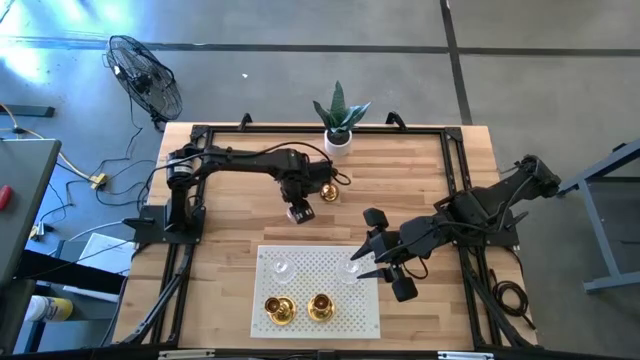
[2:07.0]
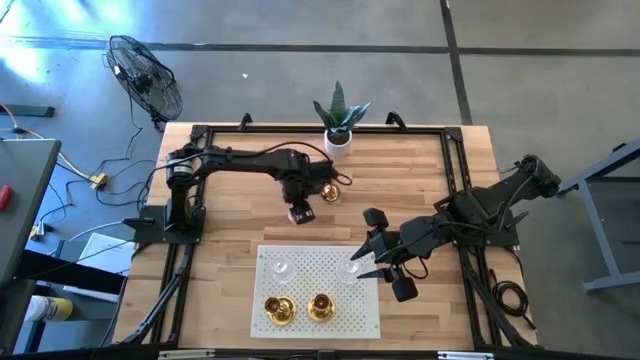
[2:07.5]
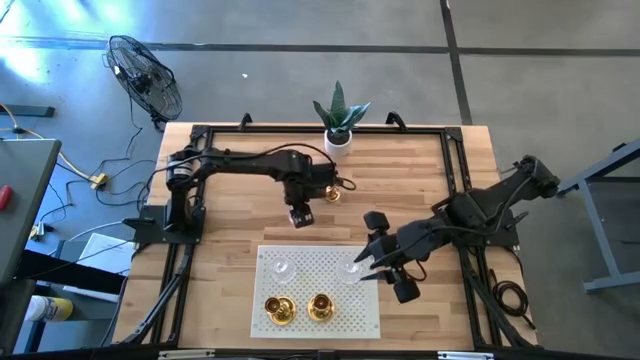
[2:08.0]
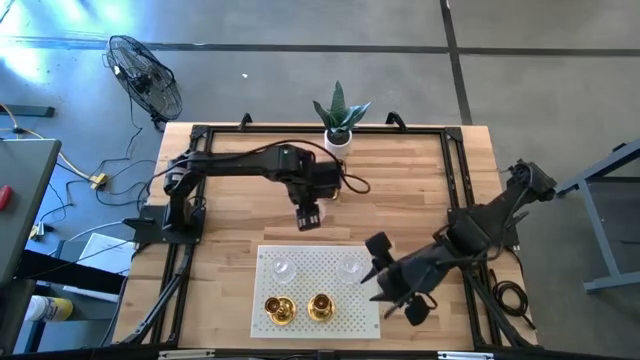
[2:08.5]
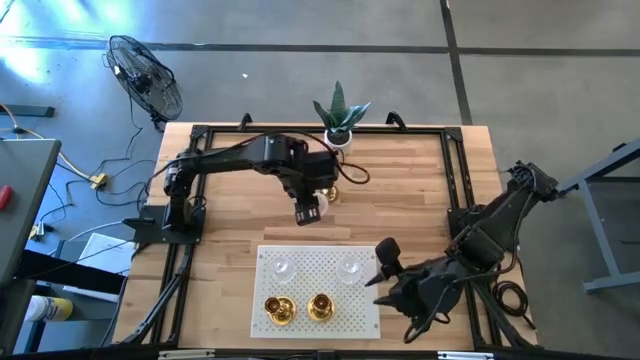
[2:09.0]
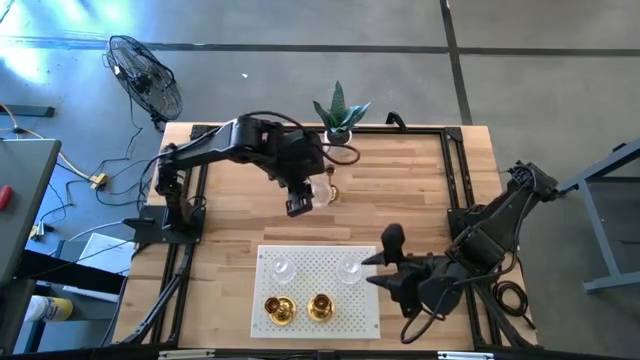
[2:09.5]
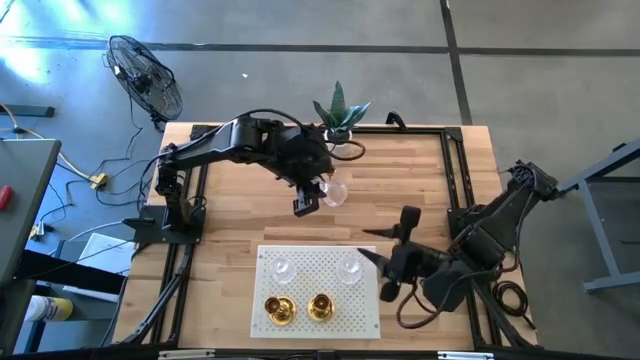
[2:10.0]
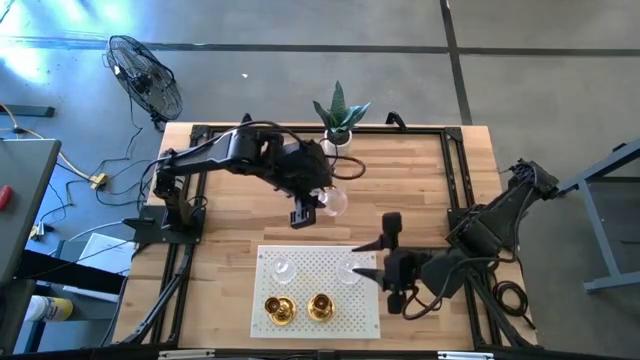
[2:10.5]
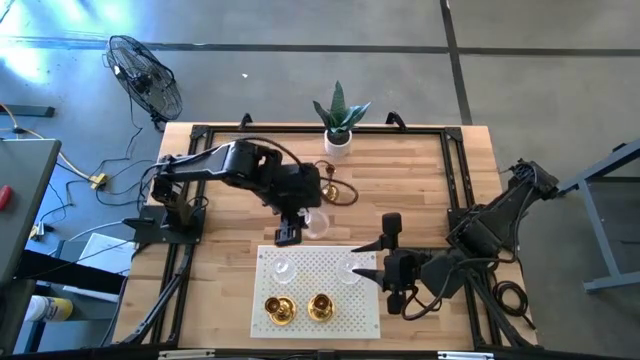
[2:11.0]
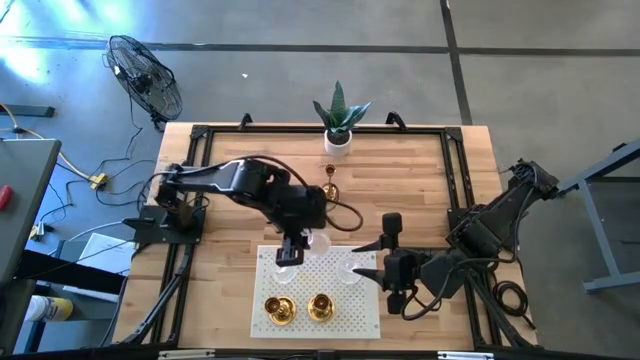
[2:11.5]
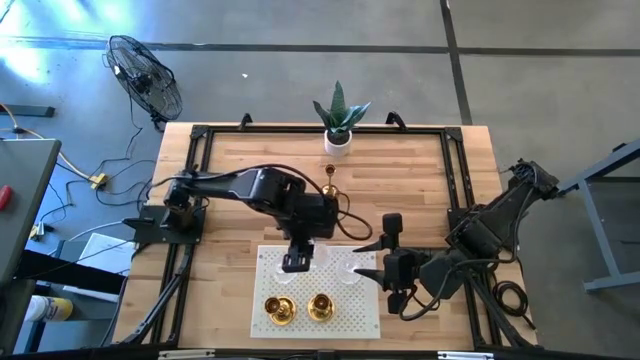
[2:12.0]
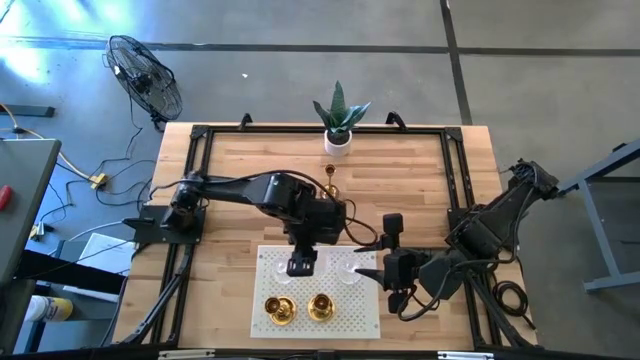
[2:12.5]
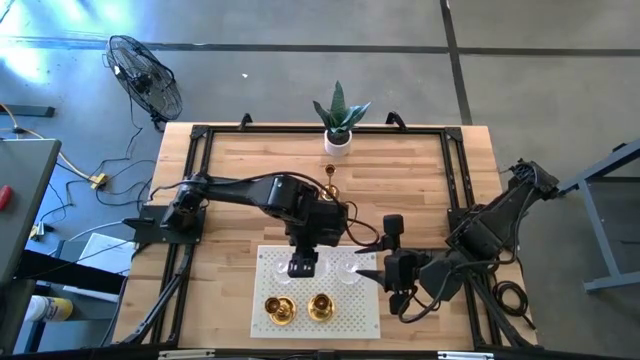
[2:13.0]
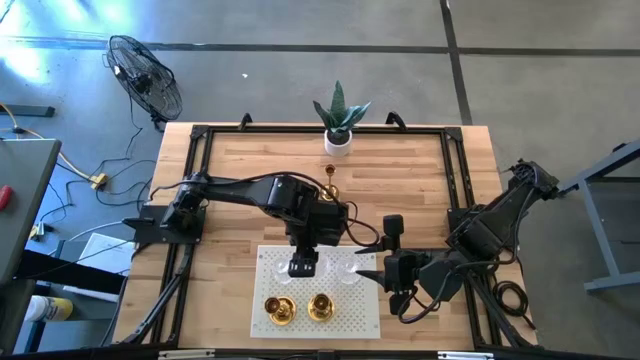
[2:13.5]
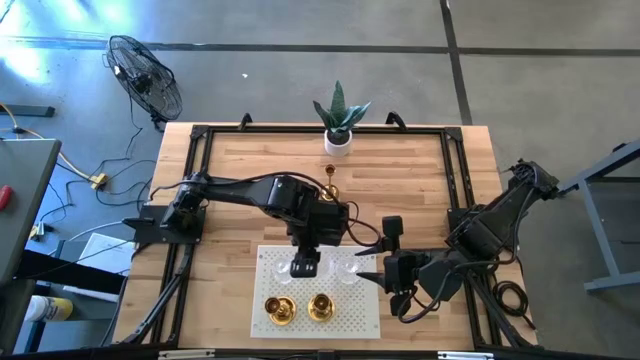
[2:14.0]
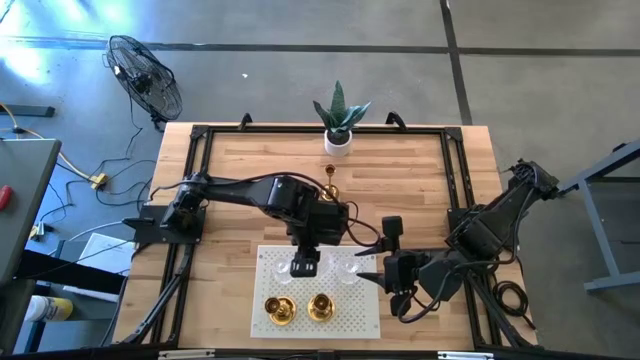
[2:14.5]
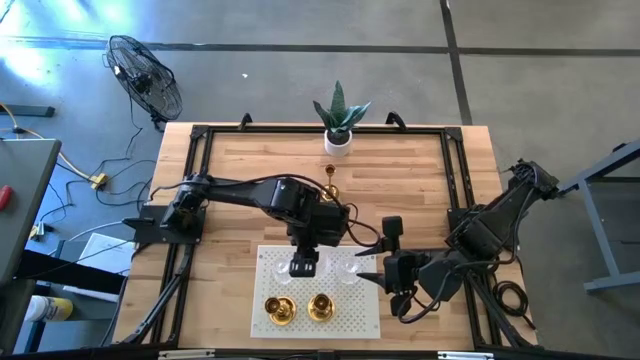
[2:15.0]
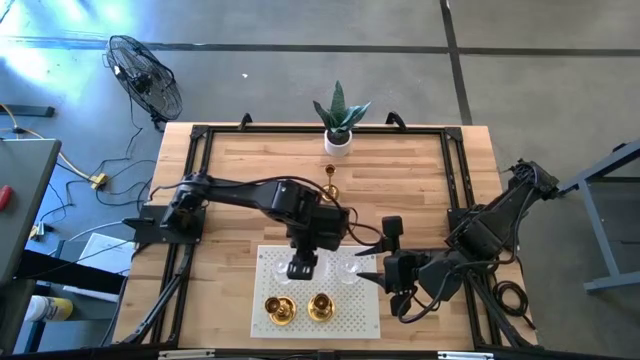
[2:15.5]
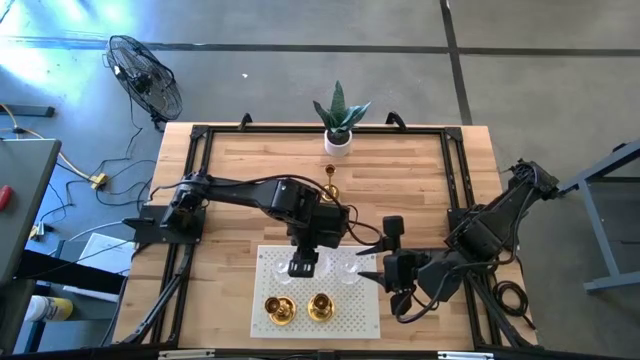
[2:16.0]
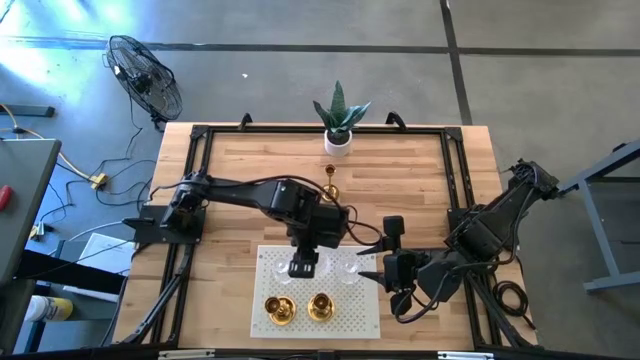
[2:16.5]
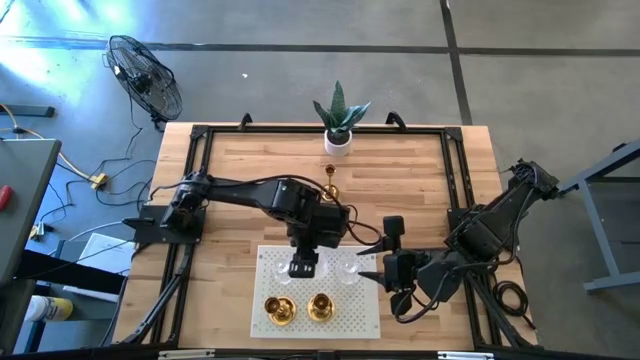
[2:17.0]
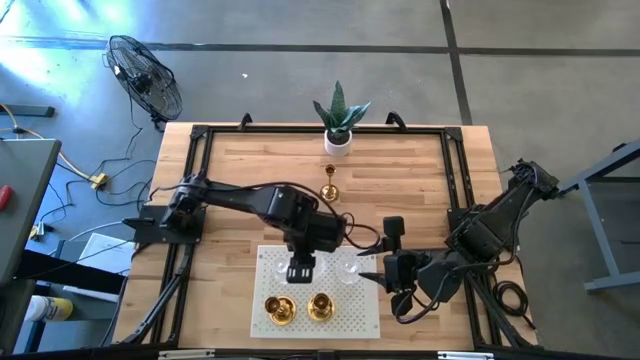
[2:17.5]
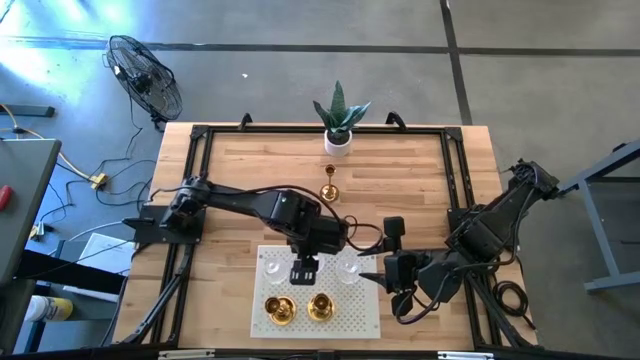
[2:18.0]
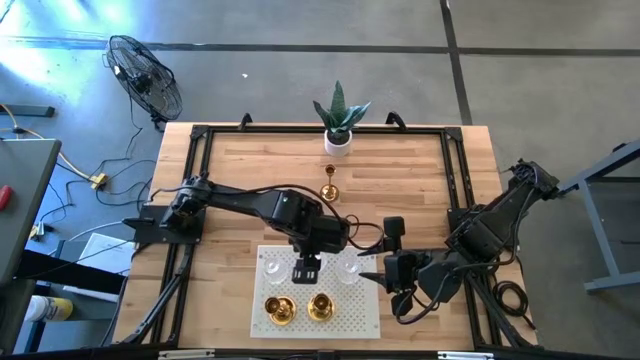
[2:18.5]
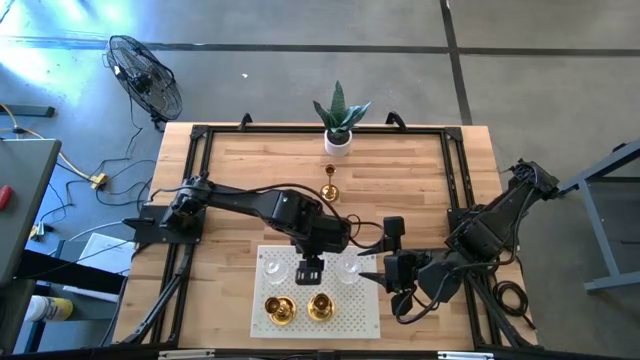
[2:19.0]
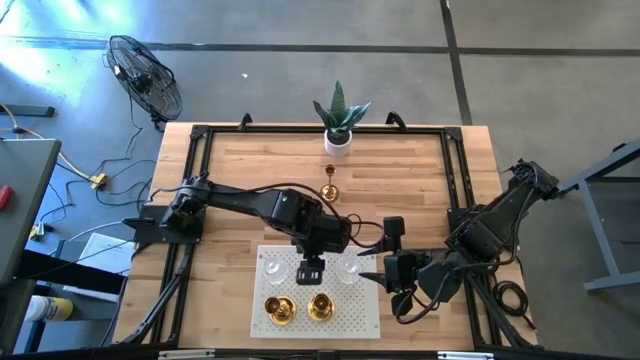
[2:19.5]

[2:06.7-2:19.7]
Task: Pick & Place candle stick holders
Put the transparent candle holder on the shelf

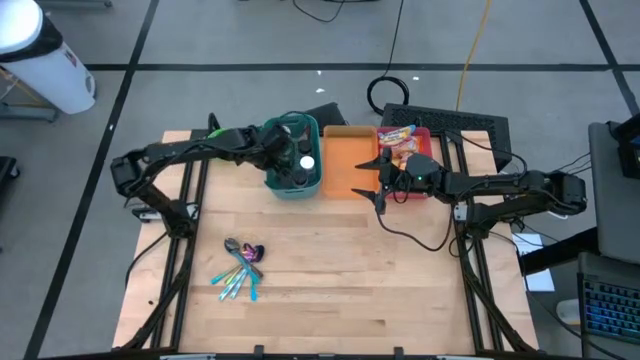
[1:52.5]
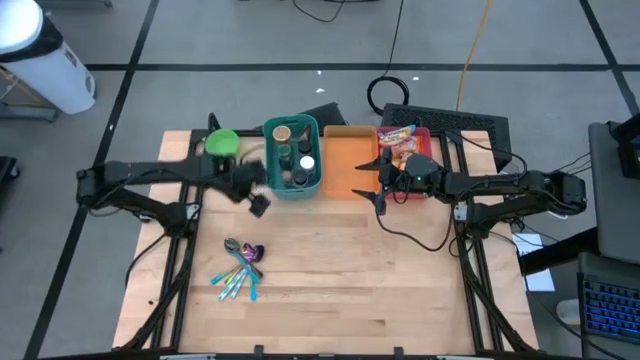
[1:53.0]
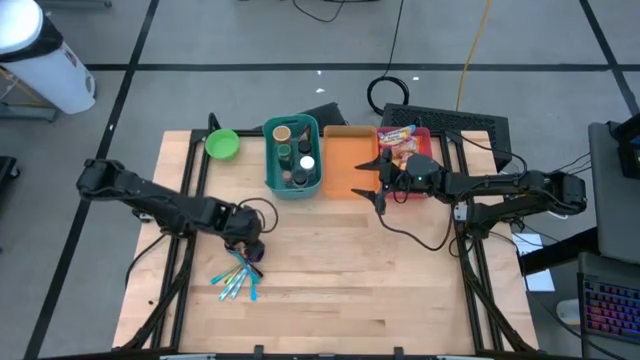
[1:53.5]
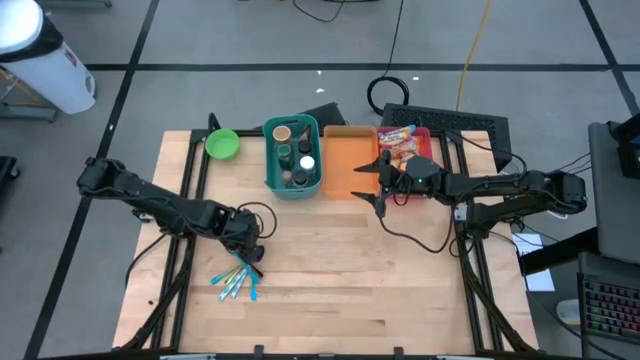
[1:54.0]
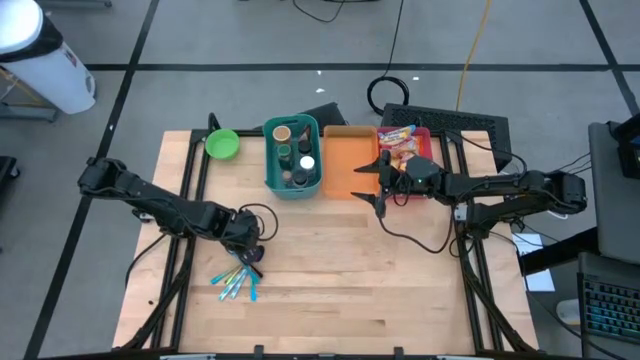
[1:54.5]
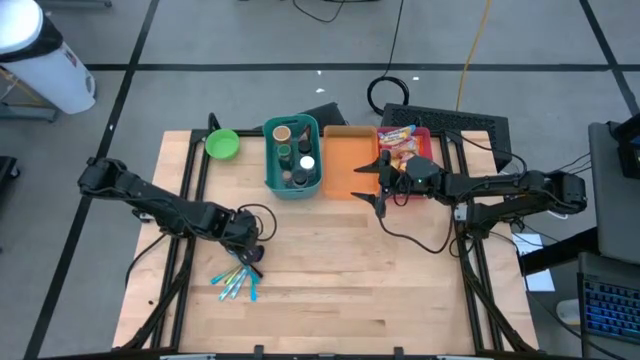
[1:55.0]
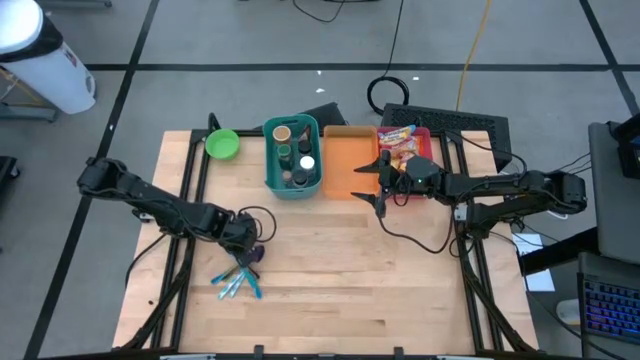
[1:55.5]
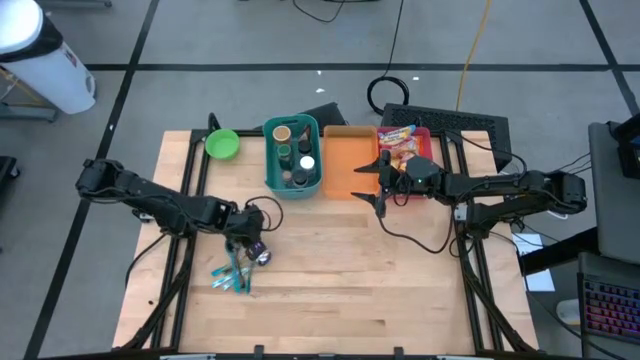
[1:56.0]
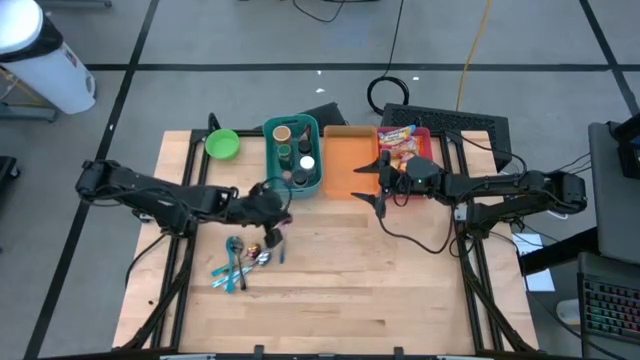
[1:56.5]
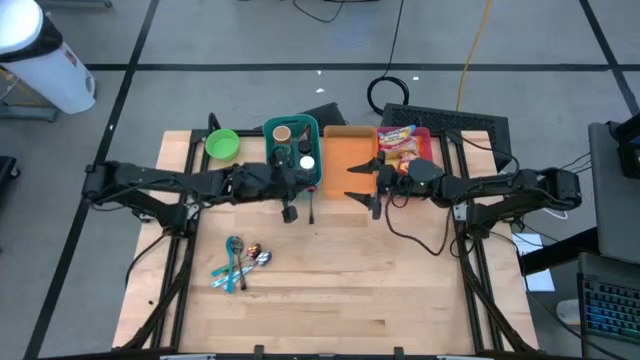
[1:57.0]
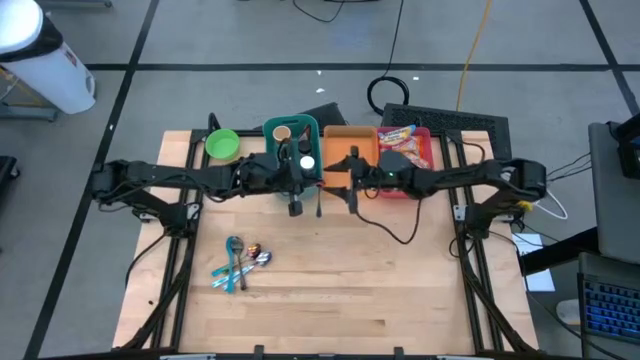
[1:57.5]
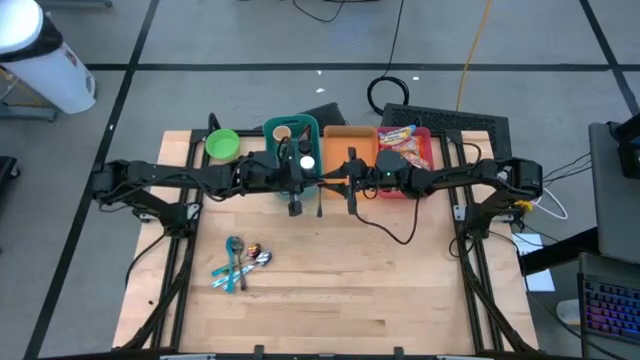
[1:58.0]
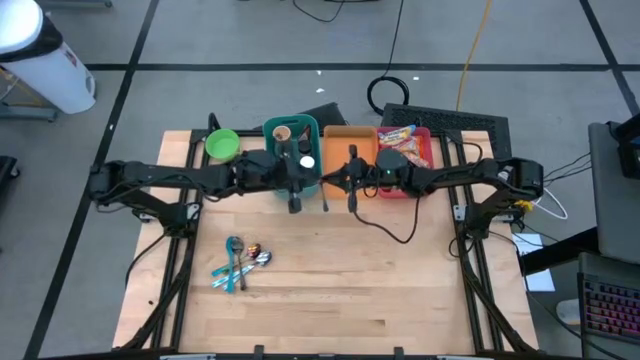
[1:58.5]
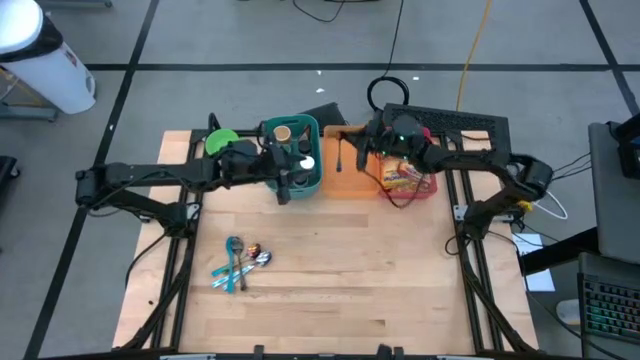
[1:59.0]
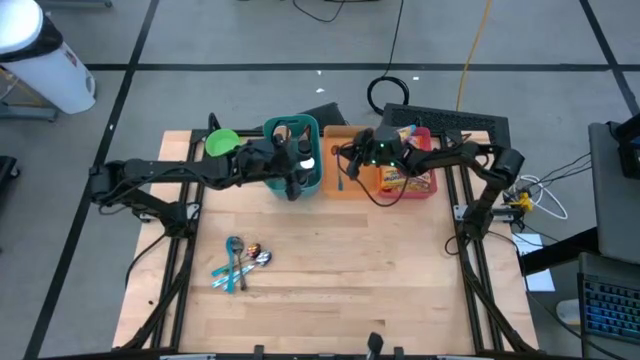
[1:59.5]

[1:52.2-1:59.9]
Task: Pick & Place Food Item
Put the left purple spoon into the orange bin
